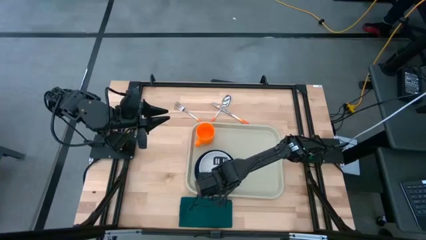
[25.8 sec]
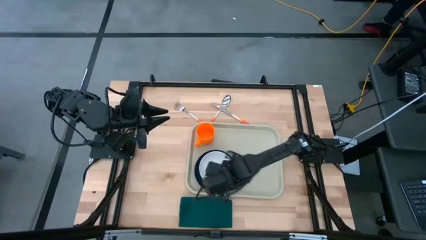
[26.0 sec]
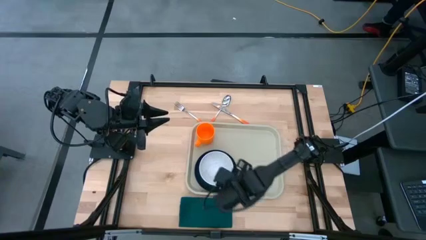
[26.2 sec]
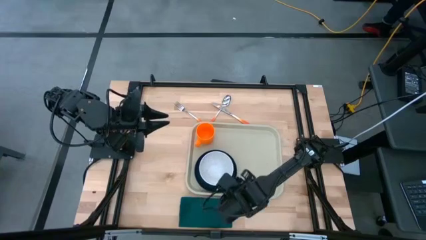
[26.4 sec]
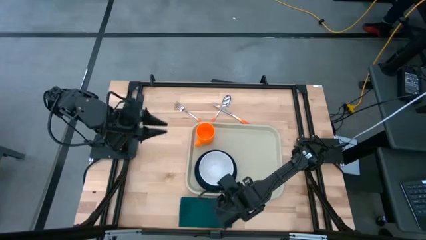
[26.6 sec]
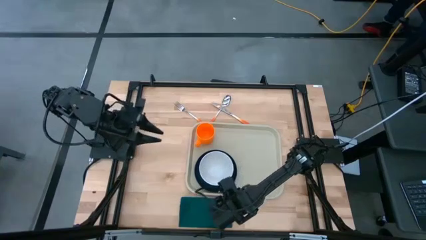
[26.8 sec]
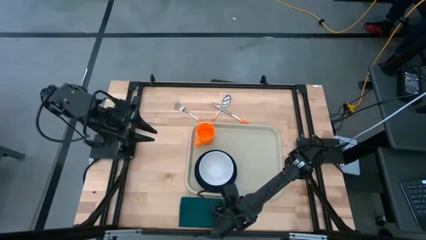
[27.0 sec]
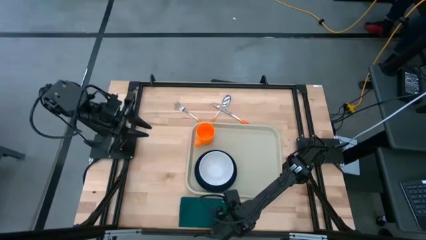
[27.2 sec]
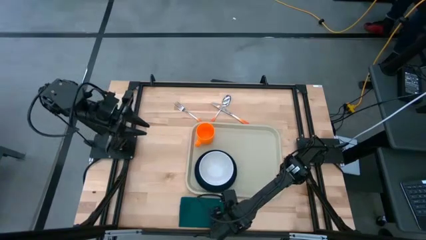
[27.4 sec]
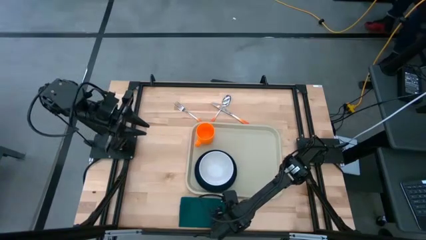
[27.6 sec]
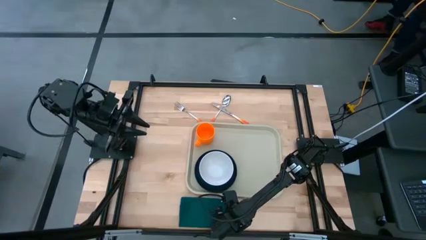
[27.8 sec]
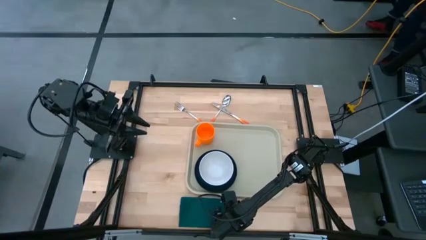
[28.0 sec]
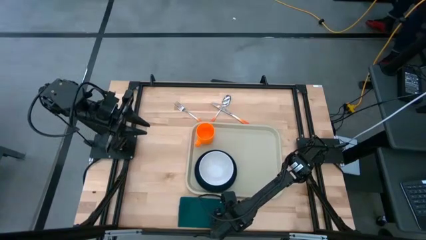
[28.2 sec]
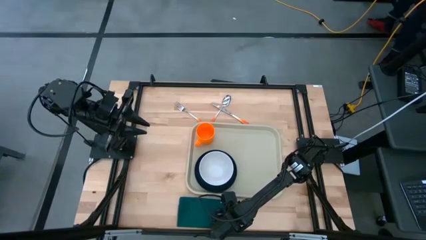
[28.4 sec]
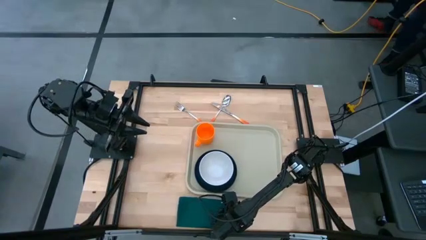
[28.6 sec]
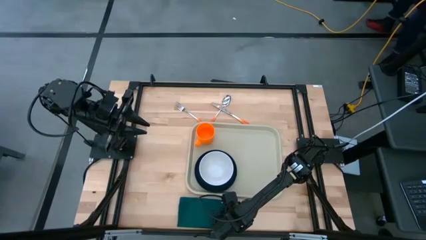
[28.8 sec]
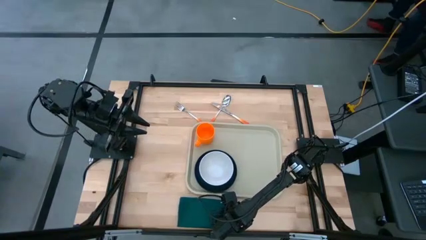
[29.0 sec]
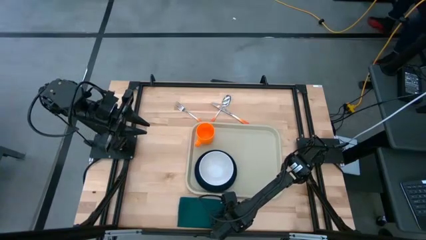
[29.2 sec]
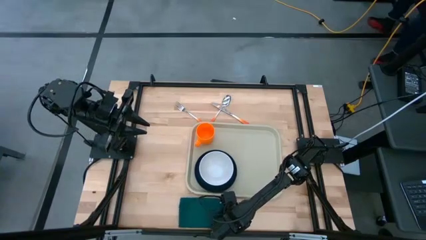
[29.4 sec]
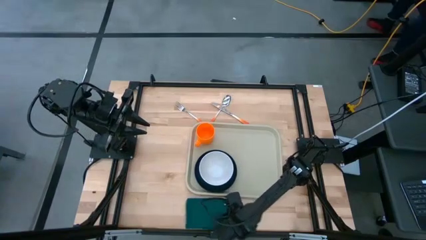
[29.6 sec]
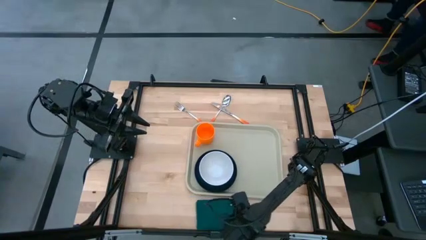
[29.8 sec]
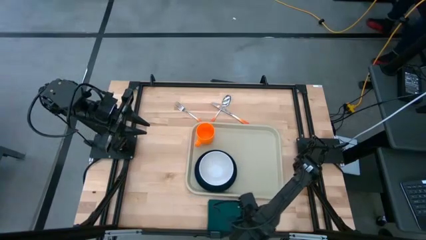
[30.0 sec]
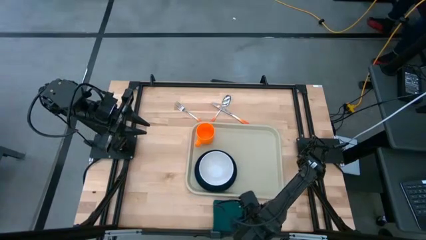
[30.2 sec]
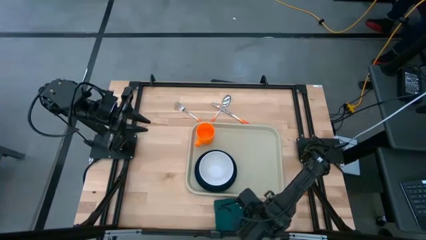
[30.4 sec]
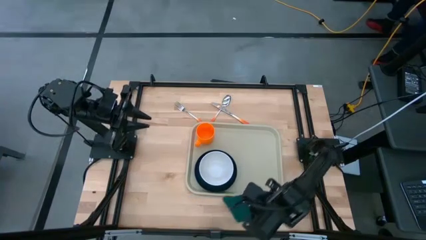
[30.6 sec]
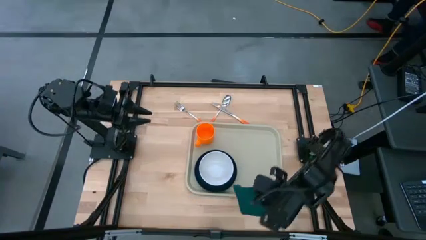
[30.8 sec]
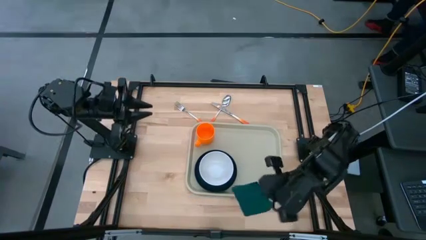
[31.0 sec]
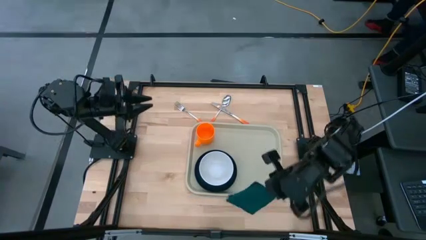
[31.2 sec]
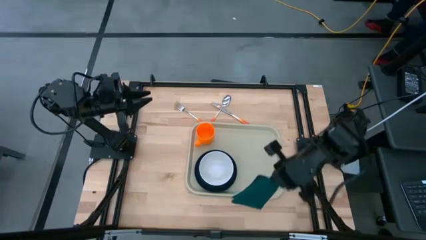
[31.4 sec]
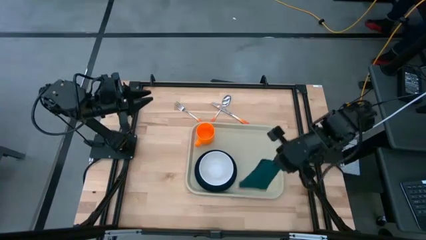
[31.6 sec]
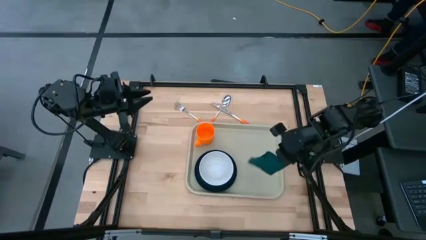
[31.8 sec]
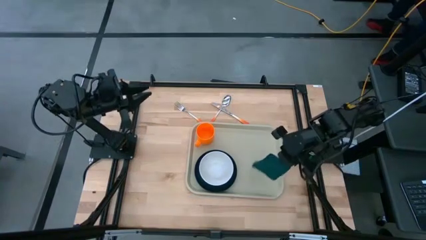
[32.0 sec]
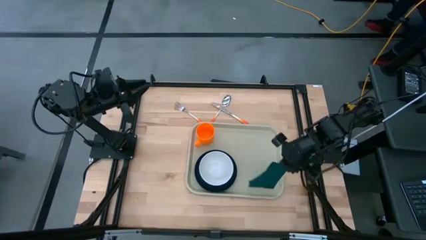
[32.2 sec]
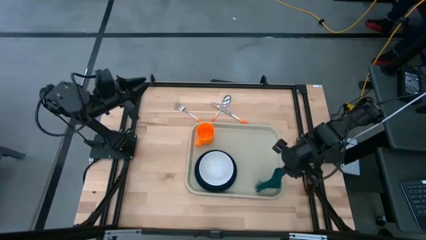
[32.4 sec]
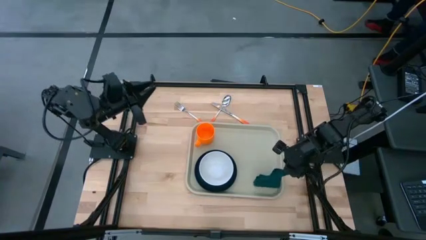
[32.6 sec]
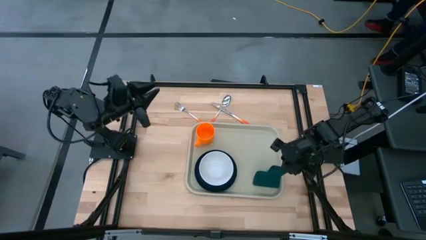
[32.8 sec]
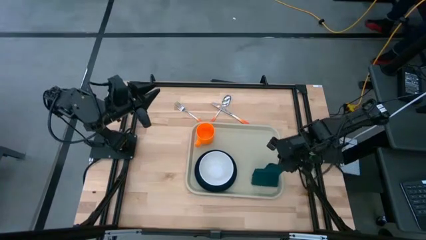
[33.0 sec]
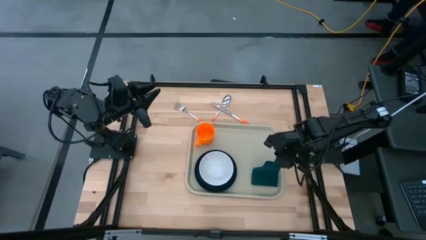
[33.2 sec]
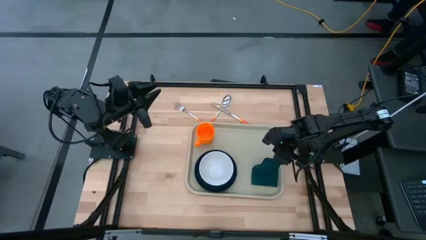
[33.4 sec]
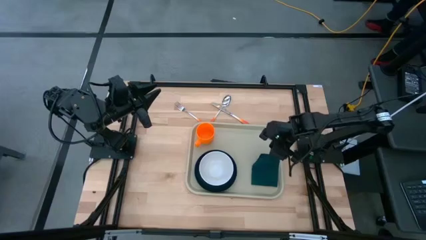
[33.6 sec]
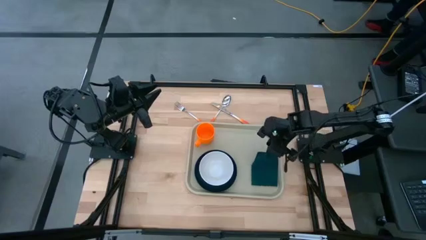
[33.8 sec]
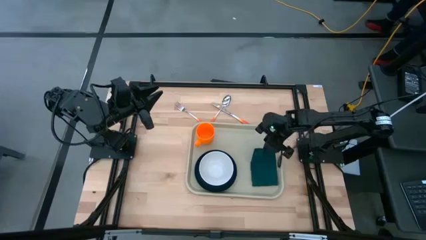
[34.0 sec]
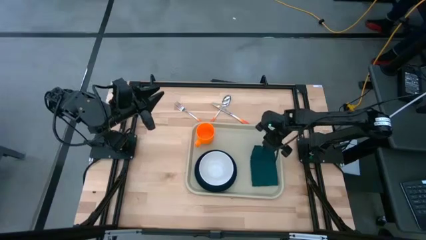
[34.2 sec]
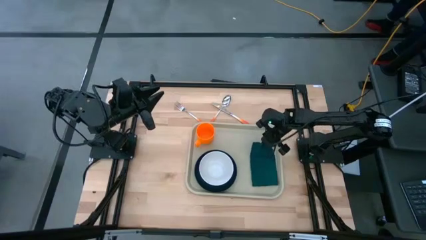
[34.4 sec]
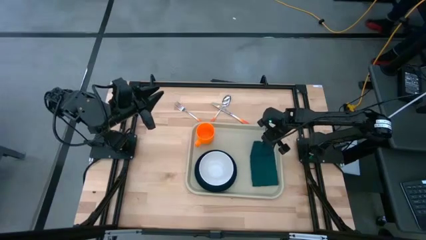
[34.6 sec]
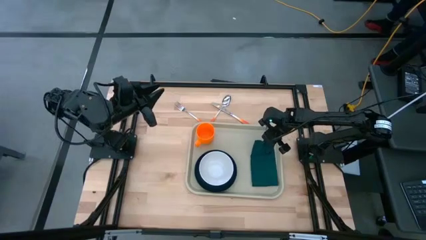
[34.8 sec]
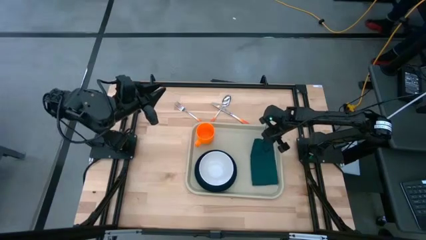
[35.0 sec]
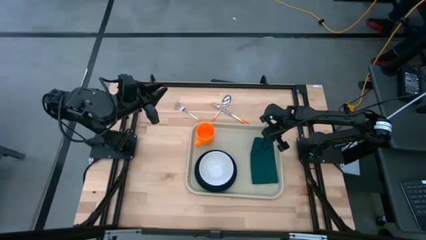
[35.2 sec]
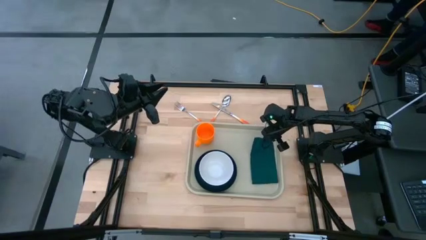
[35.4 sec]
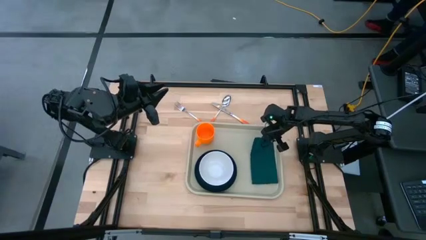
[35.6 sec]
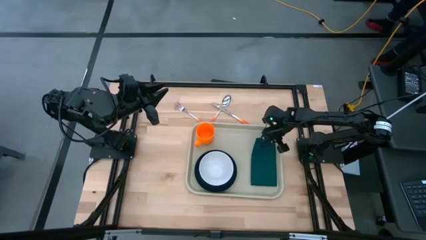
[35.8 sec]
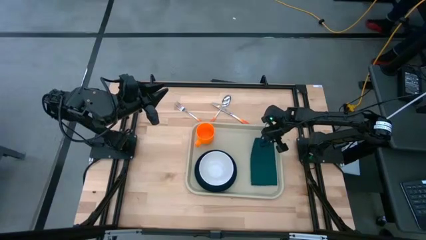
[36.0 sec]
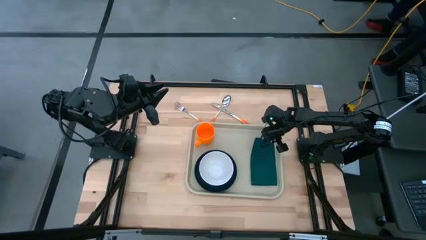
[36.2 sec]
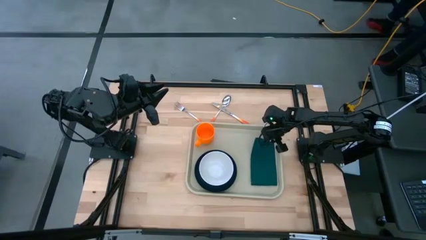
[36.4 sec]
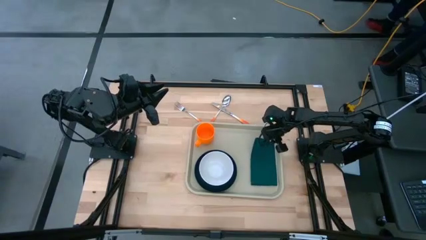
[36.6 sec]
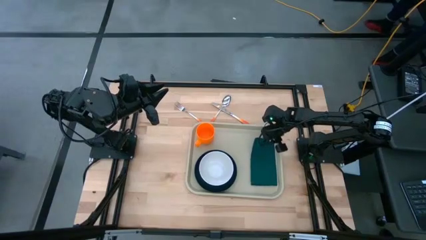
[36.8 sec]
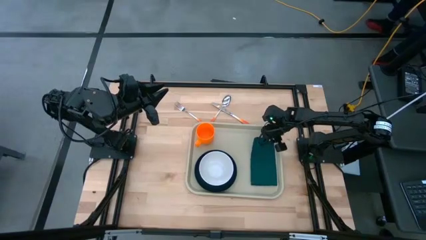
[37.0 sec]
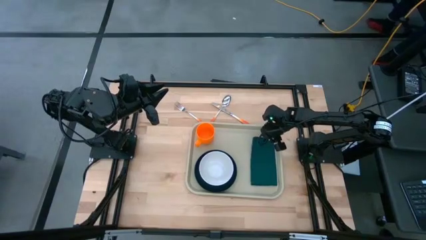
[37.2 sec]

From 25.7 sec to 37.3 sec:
Task: Set up tray
Put the green napkin on the white tray to the right of the black plate

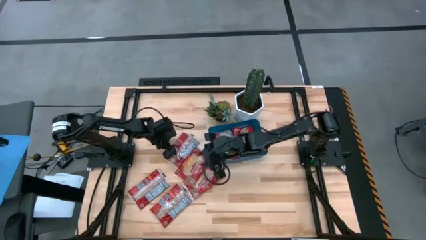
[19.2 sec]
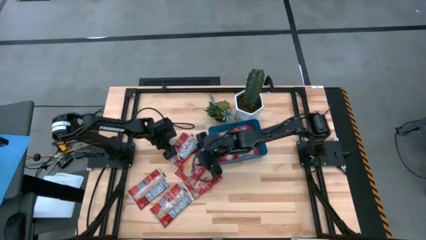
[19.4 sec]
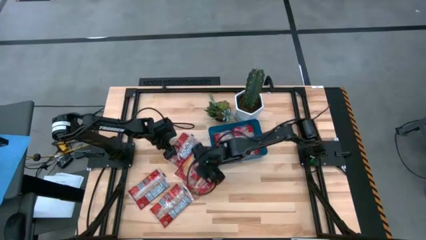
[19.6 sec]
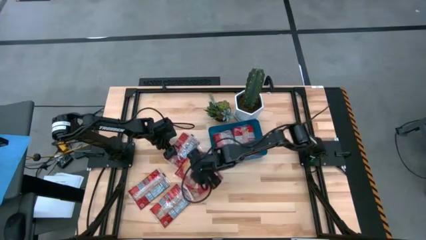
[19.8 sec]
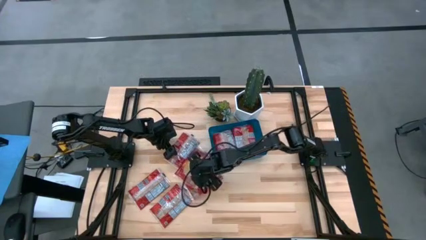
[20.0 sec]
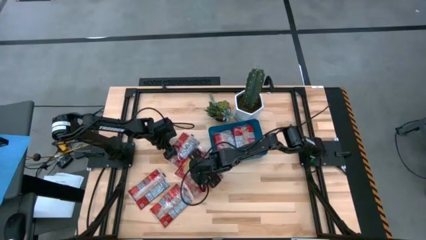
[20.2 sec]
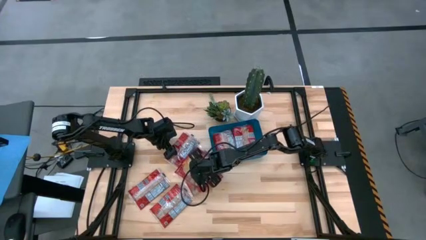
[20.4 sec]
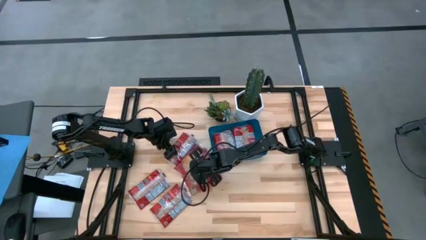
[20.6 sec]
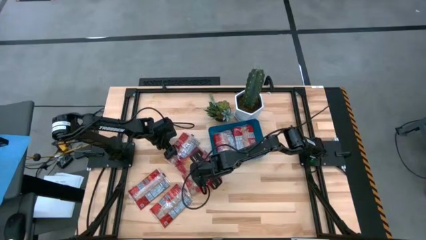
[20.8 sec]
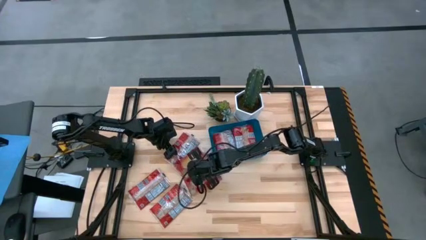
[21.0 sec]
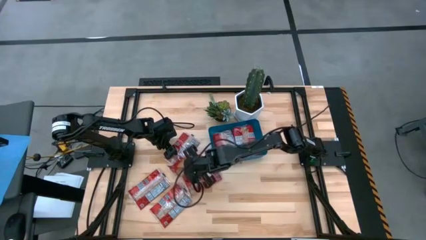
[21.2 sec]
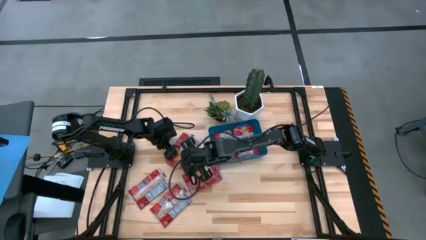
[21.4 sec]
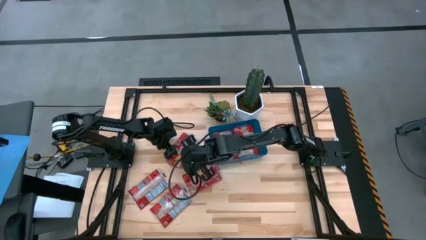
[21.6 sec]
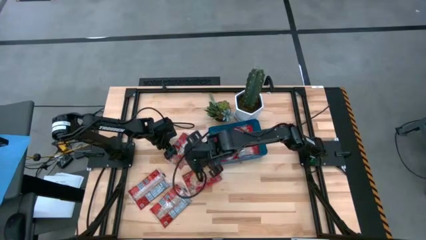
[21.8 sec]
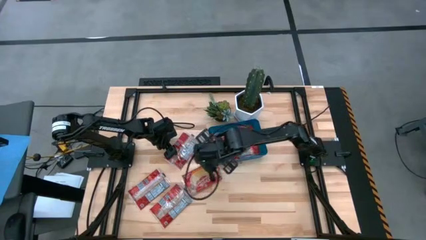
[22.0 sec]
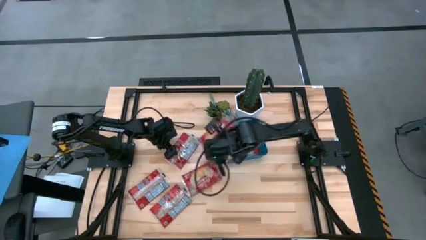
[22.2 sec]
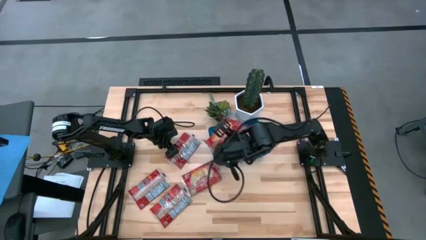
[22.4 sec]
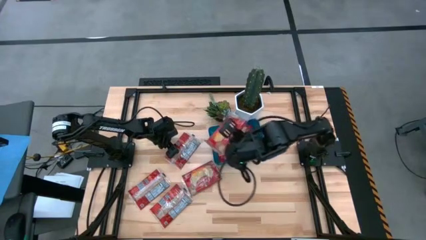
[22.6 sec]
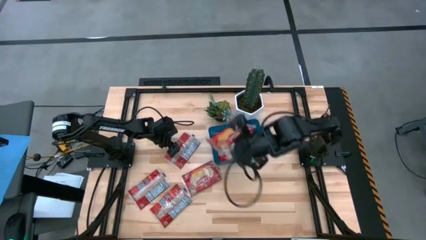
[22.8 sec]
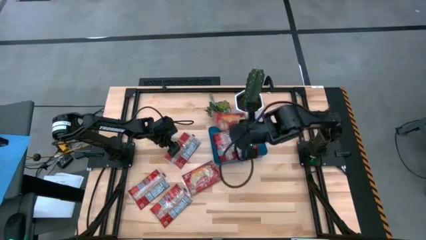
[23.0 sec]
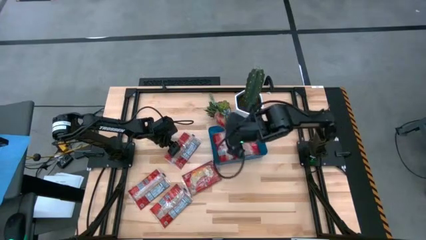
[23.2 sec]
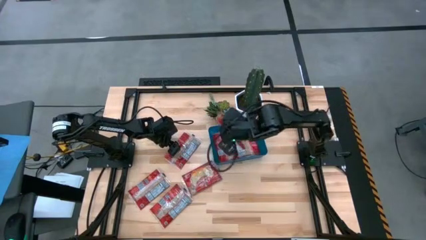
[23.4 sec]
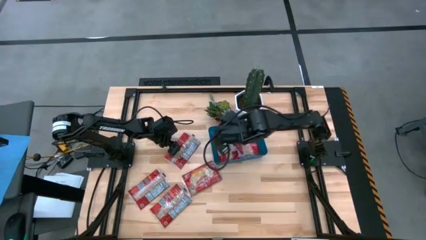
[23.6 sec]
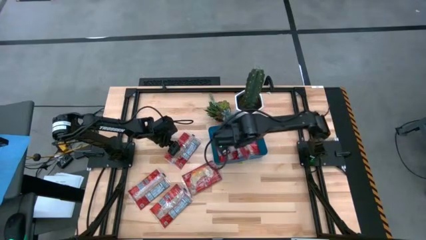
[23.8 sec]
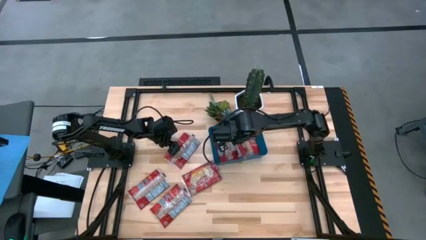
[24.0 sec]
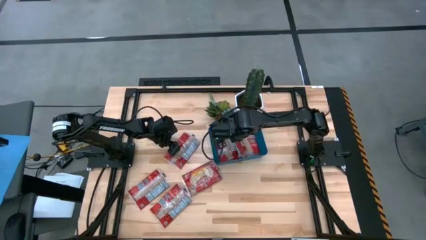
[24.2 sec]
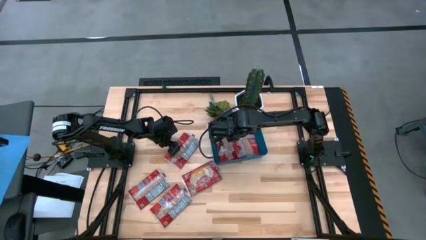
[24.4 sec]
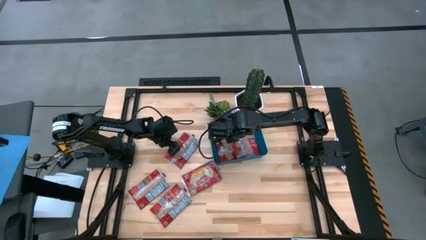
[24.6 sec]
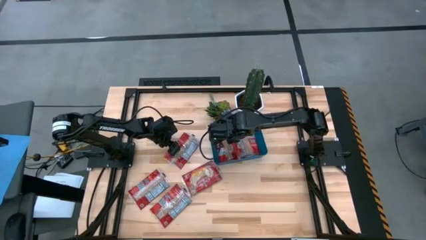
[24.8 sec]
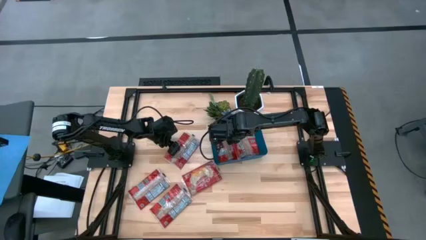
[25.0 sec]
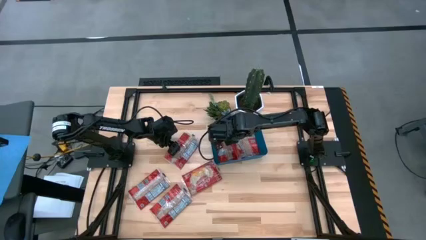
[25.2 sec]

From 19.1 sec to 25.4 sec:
Task: Sort popcorn bags into baskets
Put the red popcorn bag into the blue container
